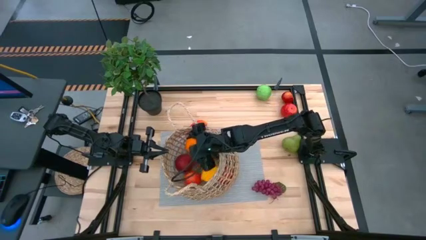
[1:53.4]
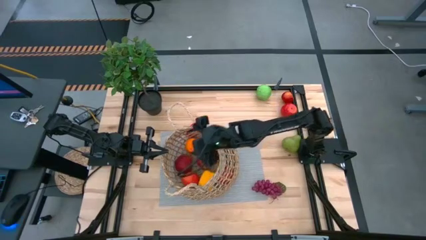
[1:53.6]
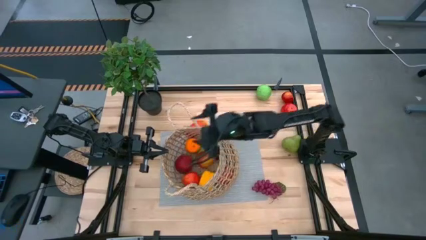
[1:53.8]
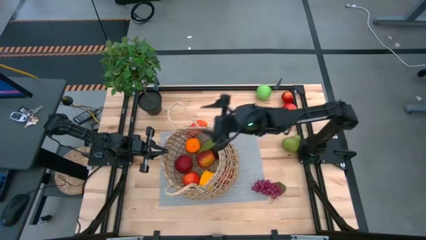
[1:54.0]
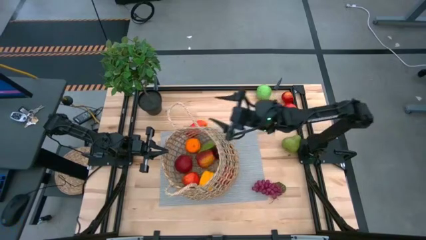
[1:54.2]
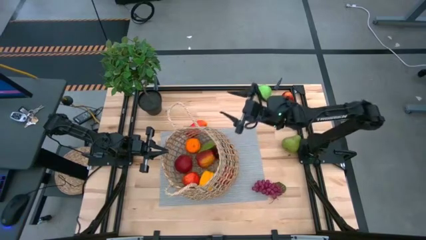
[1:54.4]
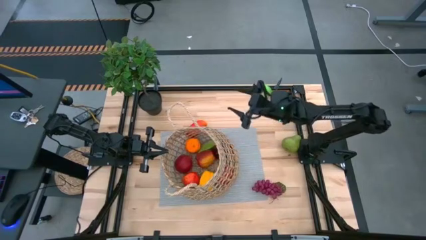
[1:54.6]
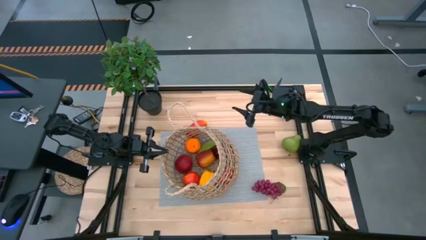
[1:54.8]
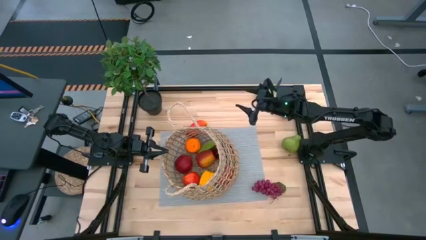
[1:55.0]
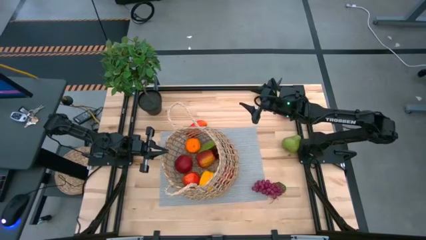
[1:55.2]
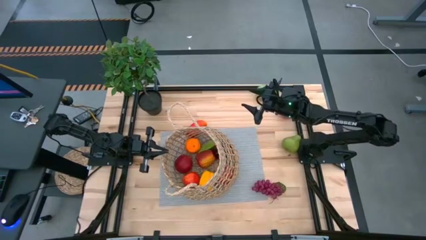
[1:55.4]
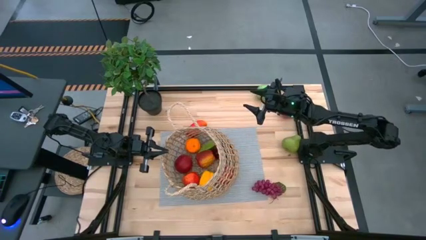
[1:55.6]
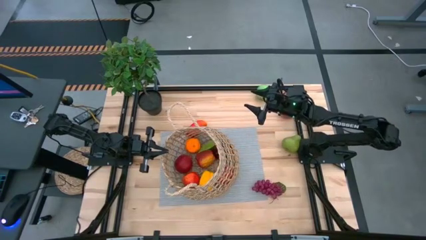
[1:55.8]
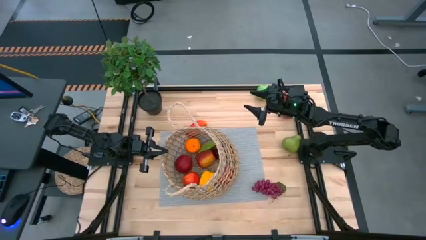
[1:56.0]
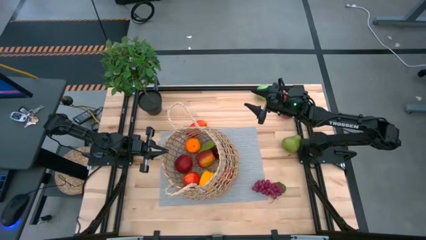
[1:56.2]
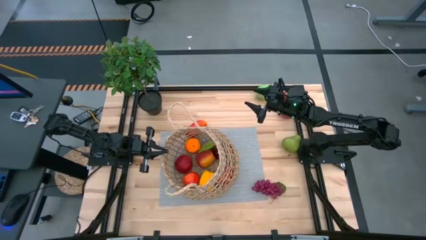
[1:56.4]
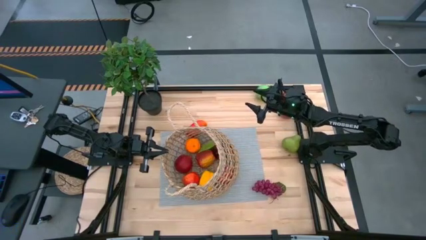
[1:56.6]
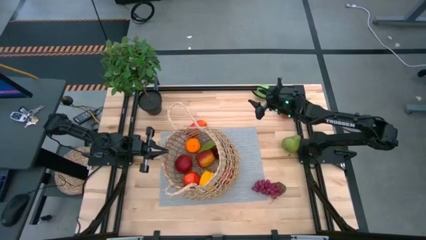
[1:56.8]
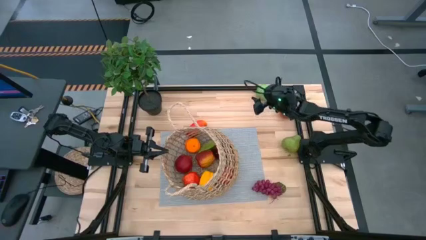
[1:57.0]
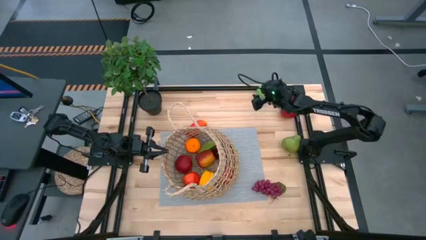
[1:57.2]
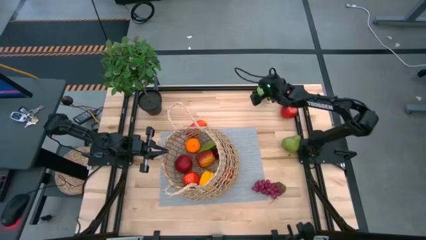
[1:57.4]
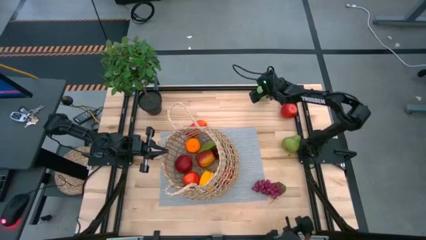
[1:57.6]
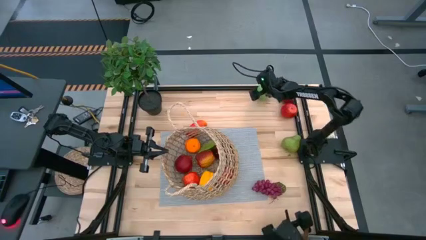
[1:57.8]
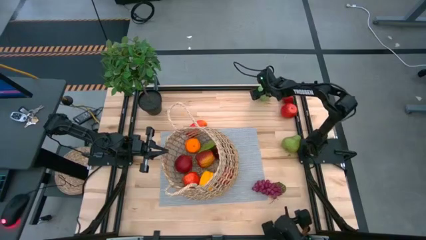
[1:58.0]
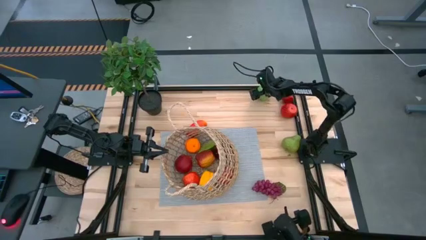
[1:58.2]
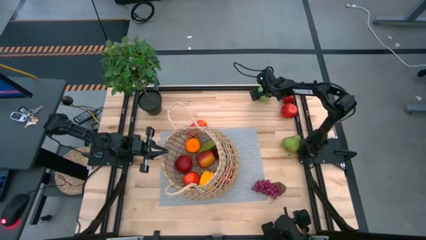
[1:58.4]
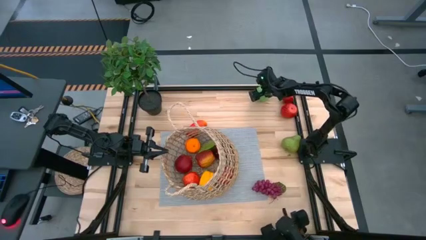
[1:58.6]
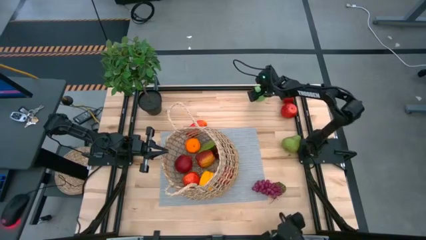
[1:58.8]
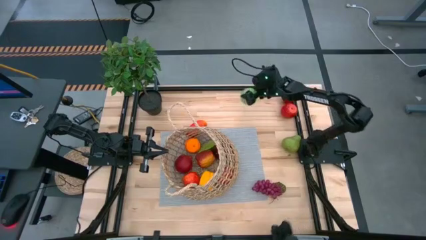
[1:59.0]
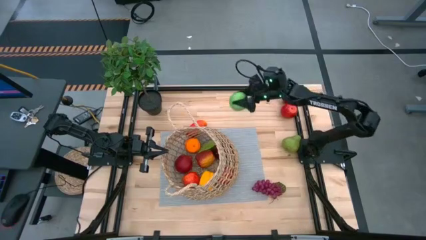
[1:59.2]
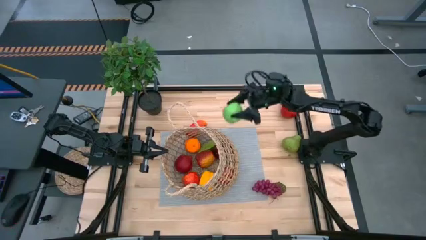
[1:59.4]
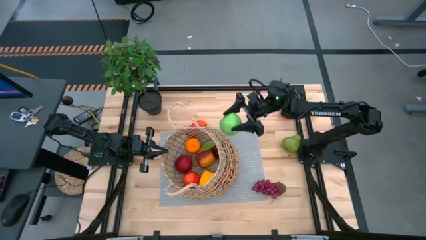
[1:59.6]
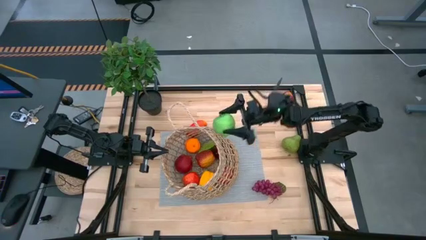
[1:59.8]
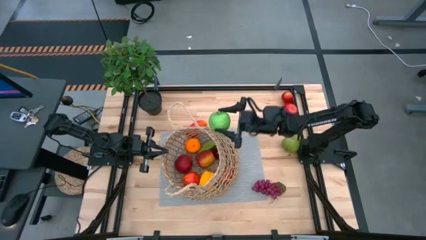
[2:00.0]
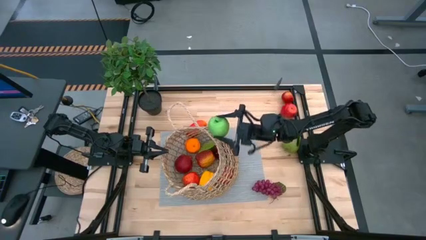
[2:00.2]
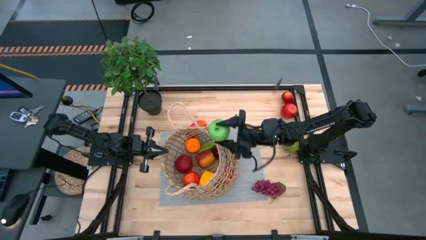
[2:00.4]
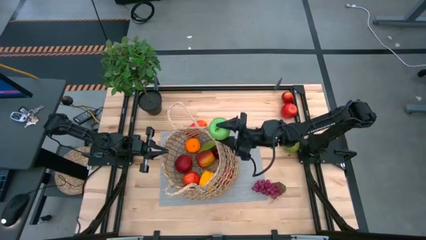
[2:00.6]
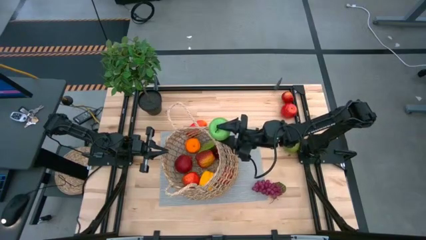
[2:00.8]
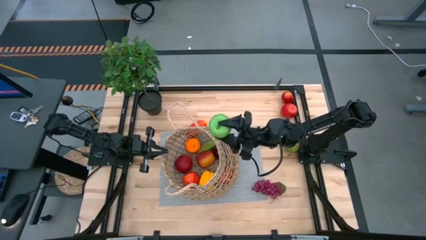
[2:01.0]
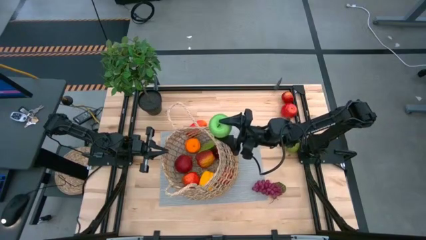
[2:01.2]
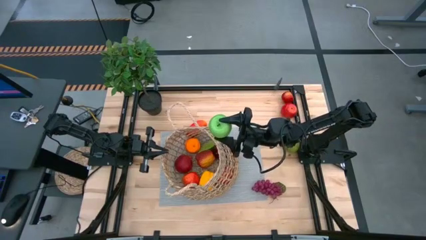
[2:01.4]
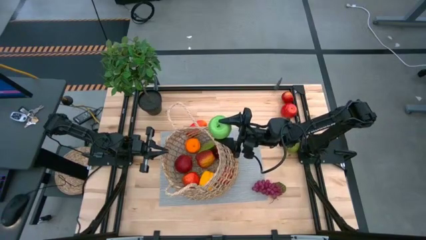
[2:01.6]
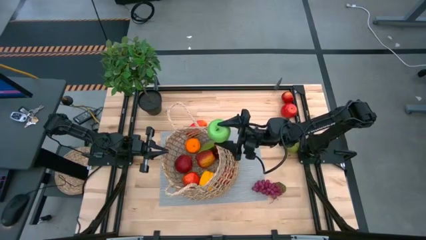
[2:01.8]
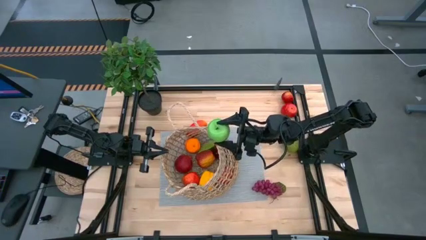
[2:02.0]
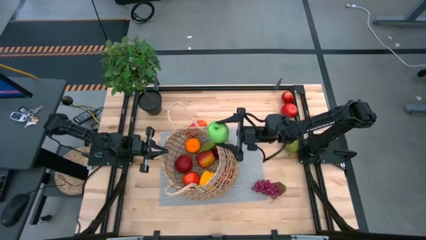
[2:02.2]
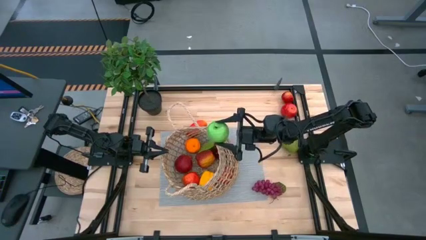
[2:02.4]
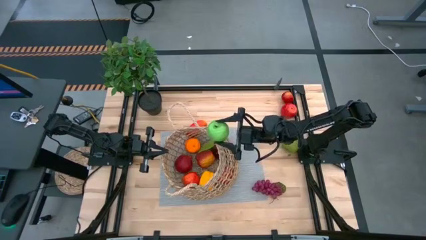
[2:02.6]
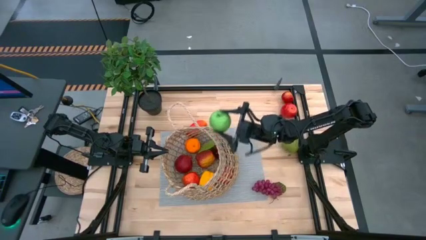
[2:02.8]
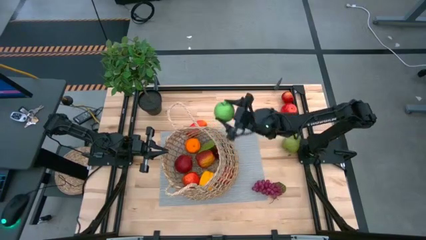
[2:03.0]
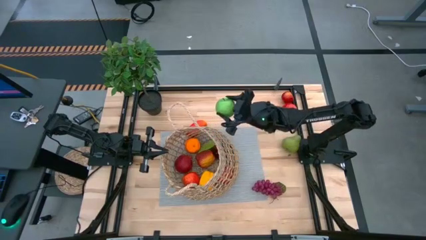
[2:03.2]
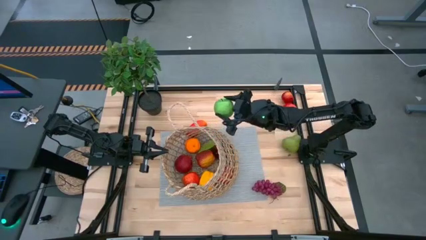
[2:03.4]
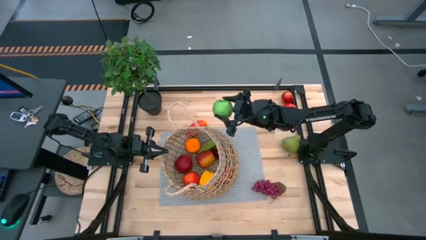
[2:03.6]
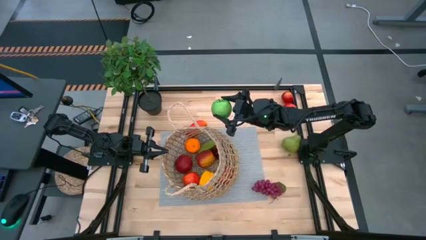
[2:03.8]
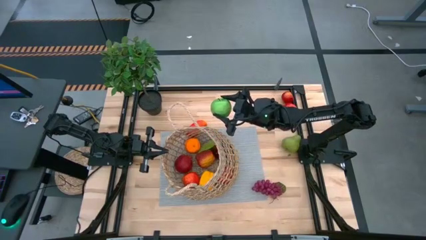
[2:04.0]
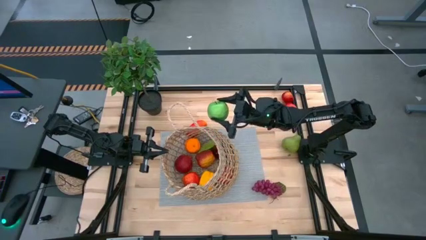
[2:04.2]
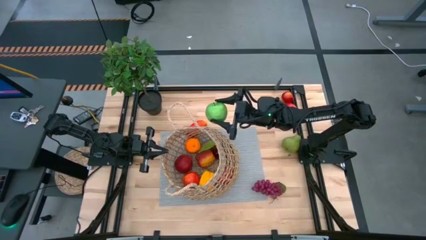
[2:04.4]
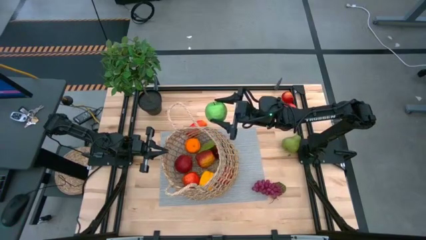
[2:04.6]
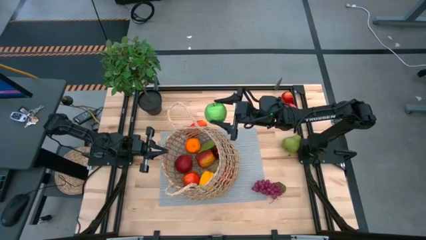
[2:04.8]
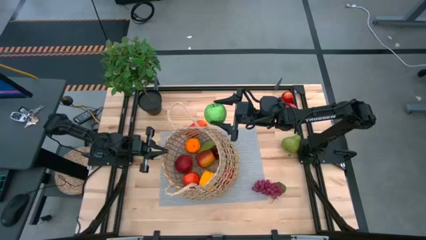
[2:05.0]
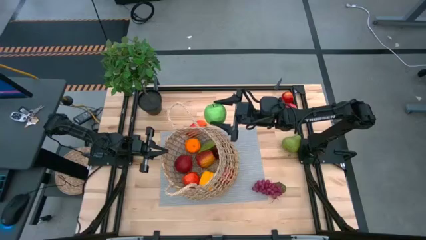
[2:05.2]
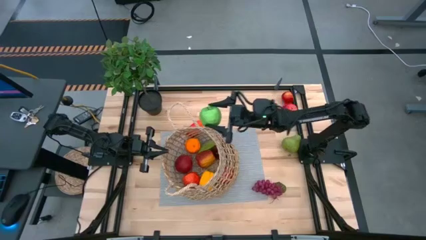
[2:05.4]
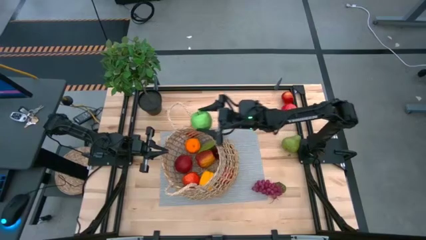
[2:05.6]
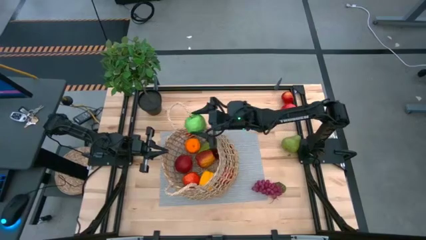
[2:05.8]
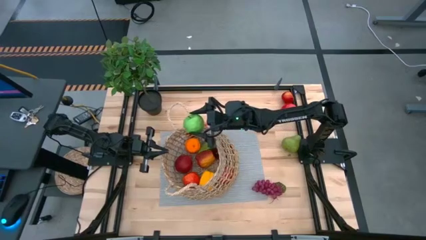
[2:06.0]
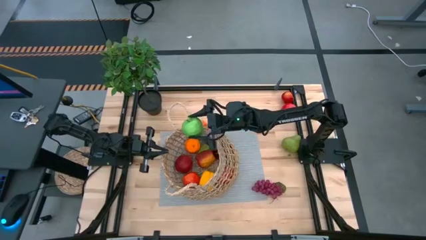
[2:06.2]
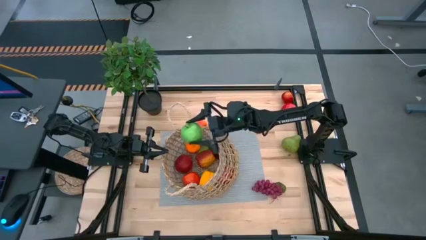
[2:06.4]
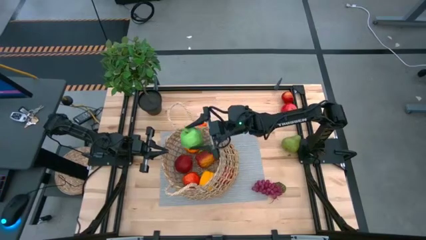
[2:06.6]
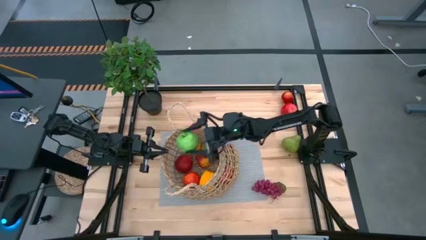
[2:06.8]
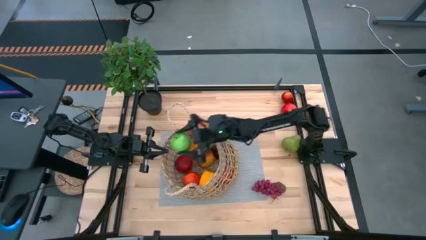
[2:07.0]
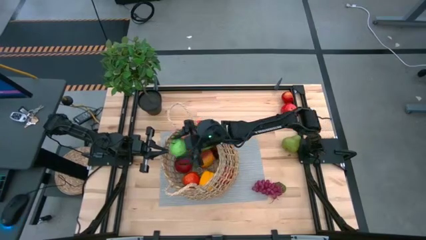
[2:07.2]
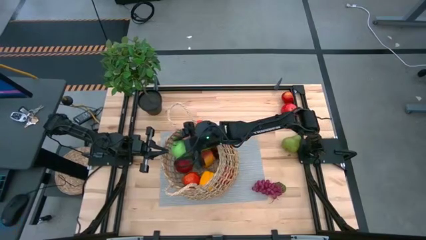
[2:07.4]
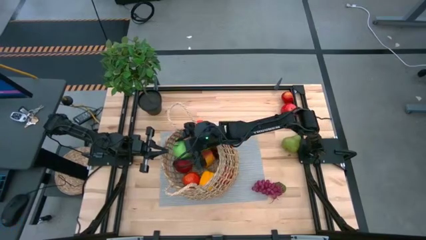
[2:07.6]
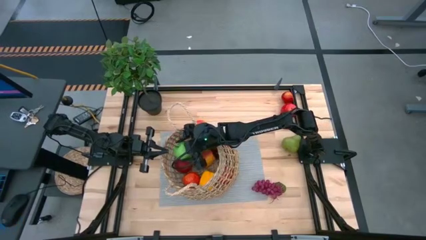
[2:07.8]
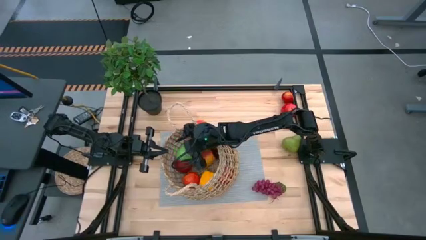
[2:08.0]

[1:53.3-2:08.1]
Task: Build produce basket
Put the green apple into the brown woven basket
